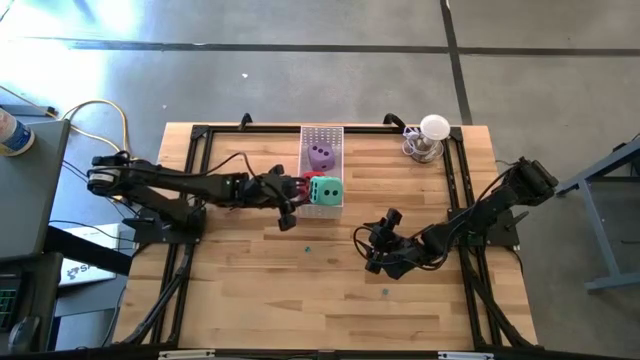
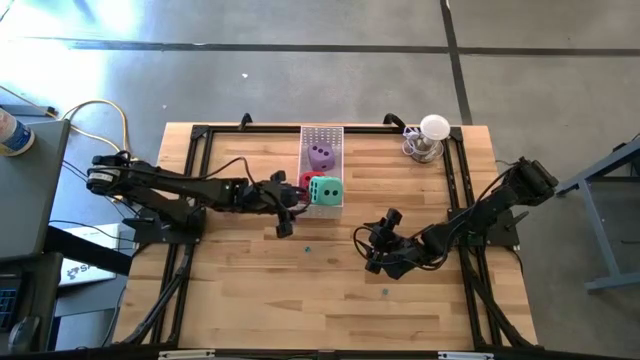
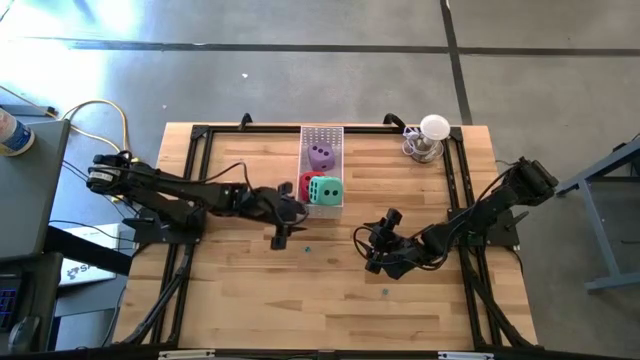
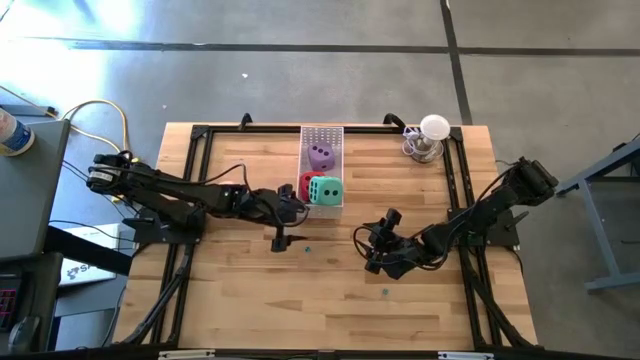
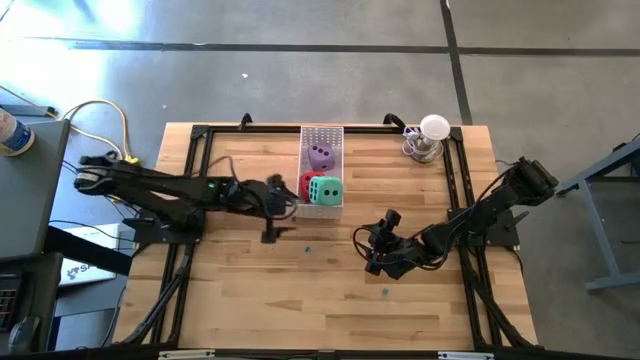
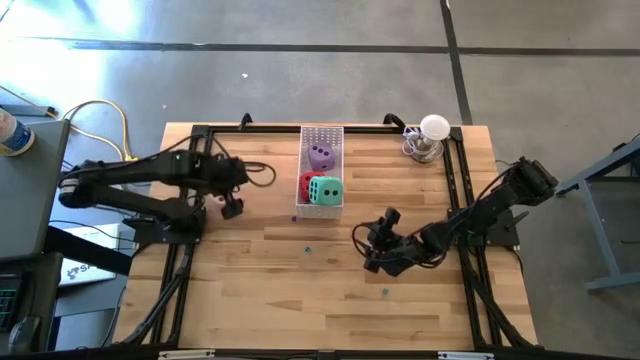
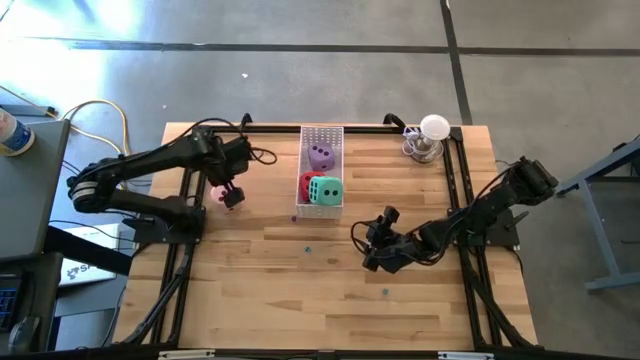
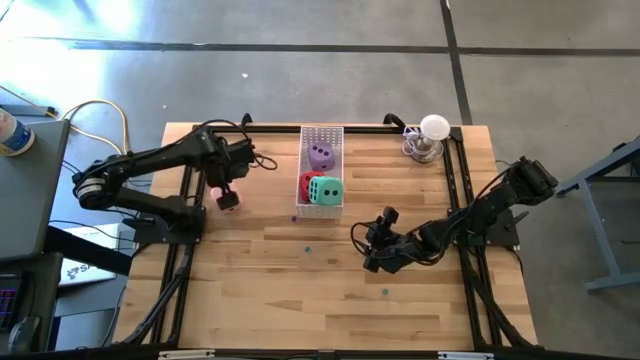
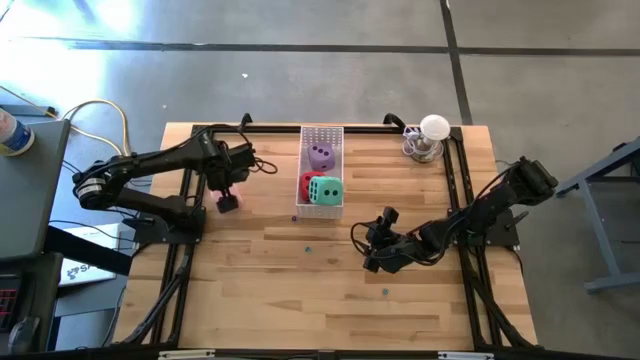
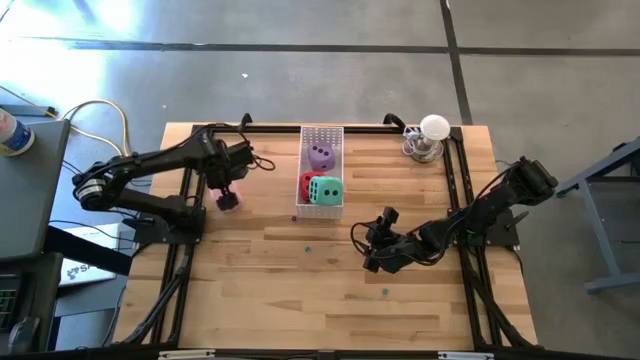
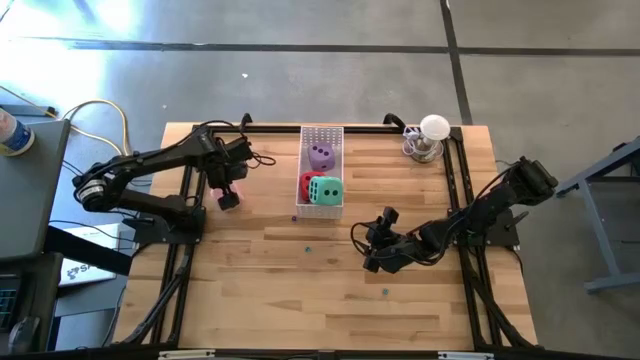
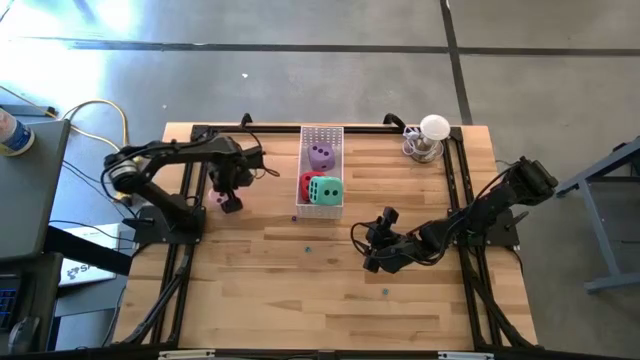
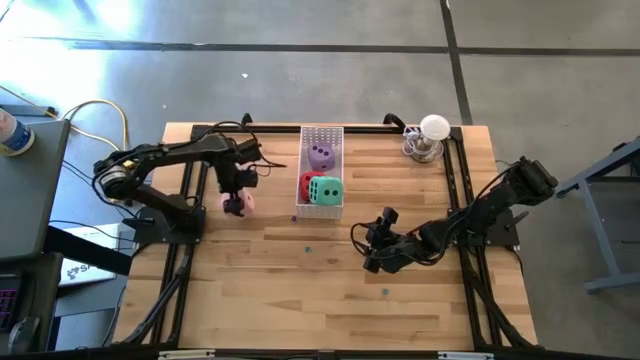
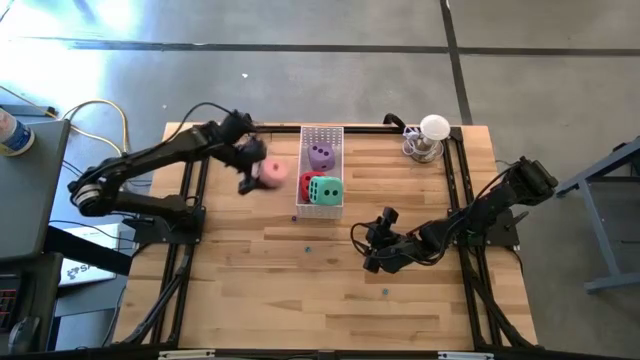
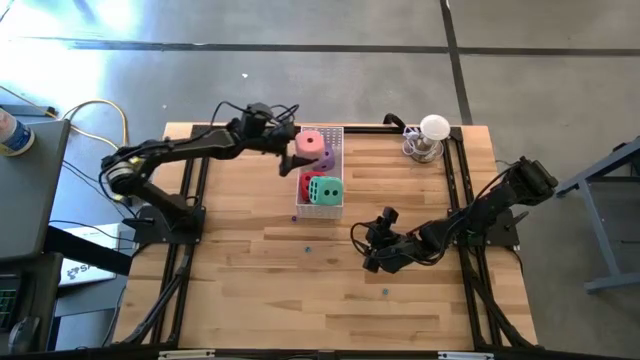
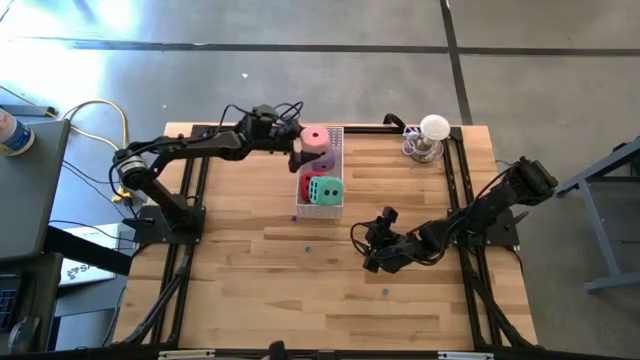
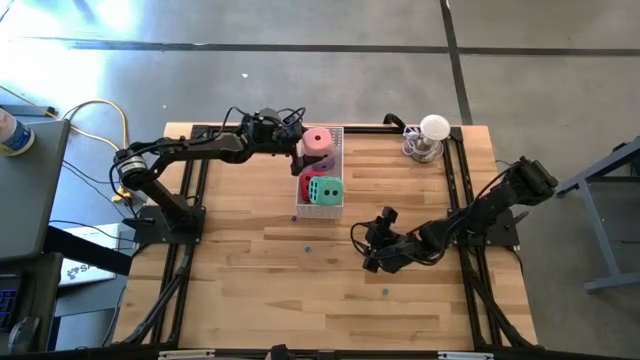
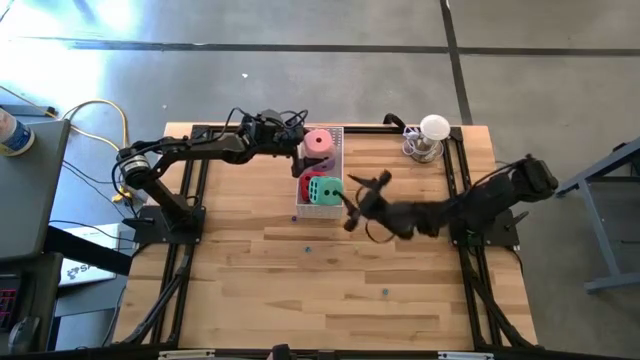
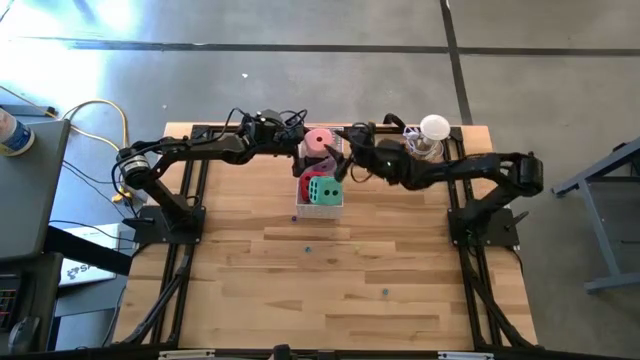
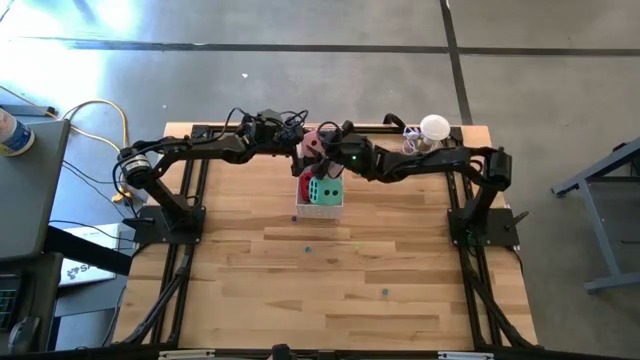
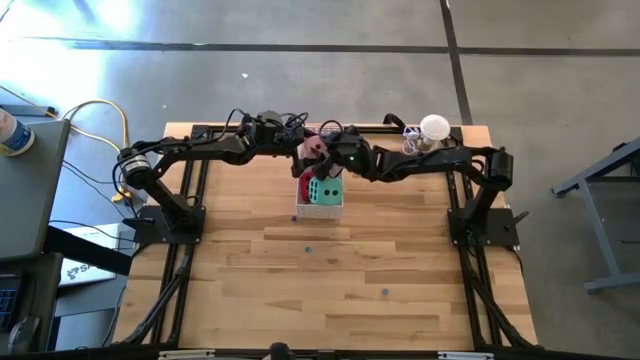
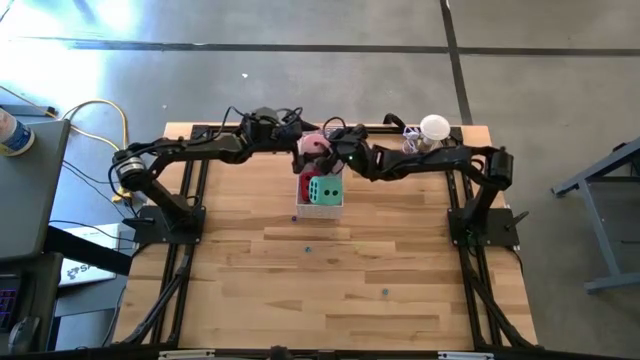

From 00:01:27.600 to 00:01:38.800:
Task: Pick & Place Dice
Put the large pink die into the bin

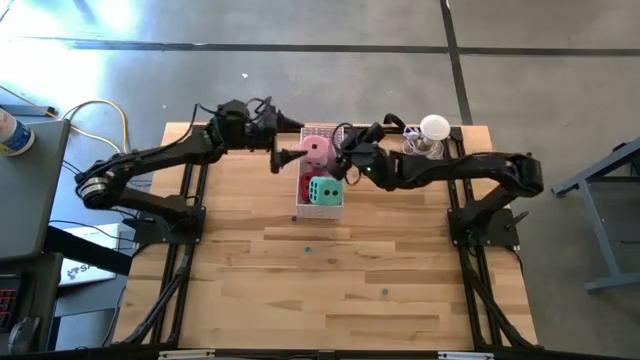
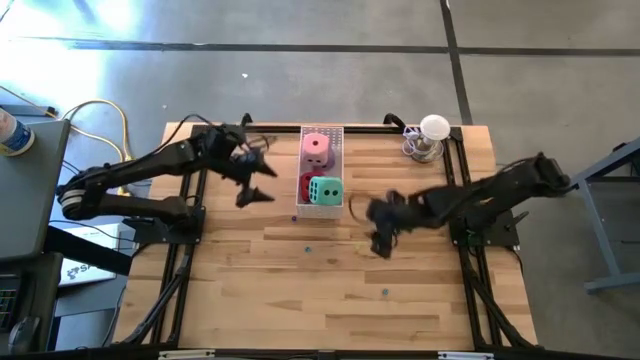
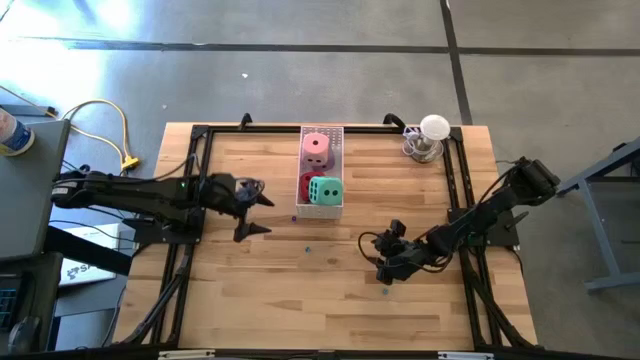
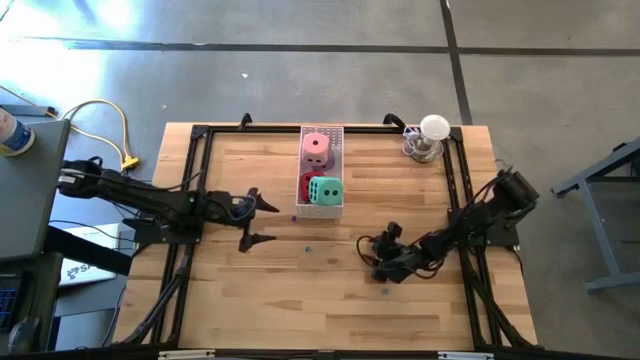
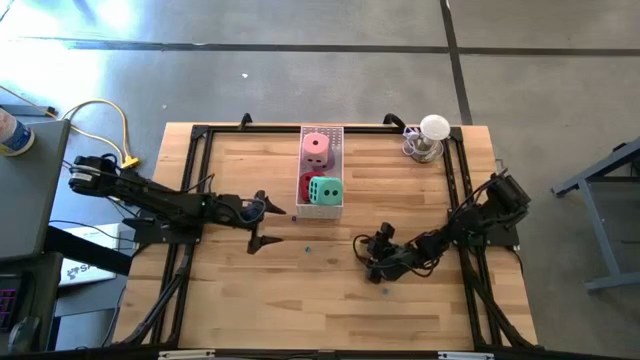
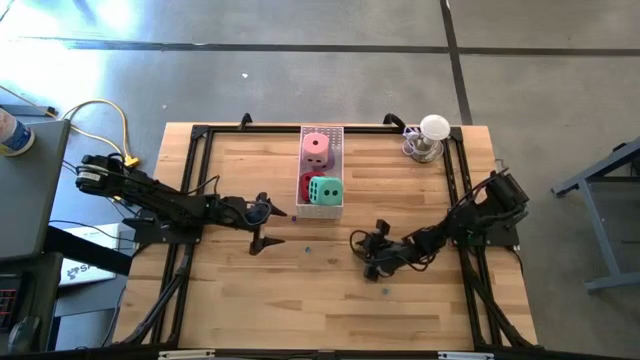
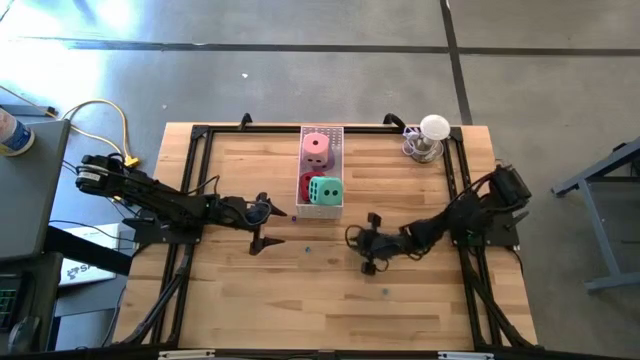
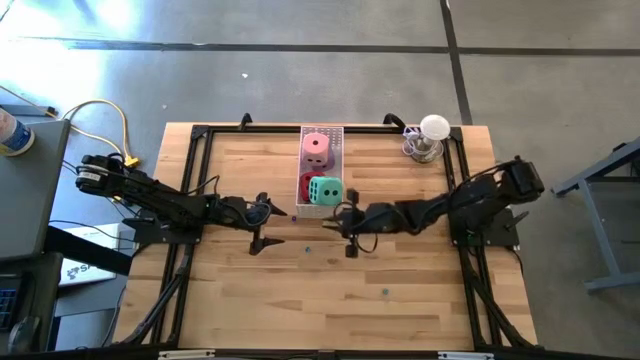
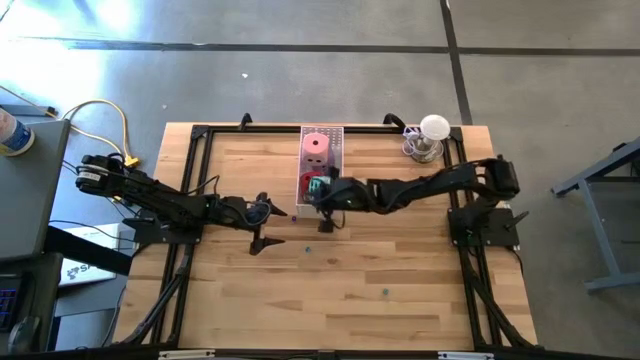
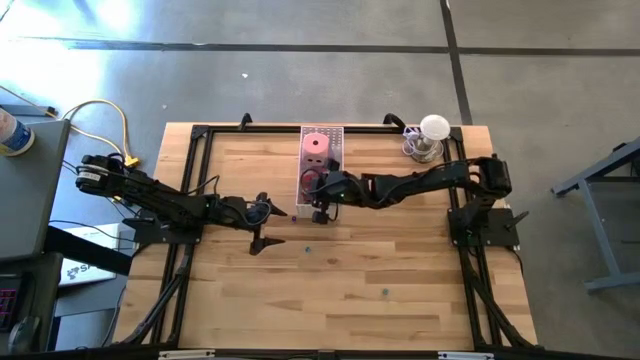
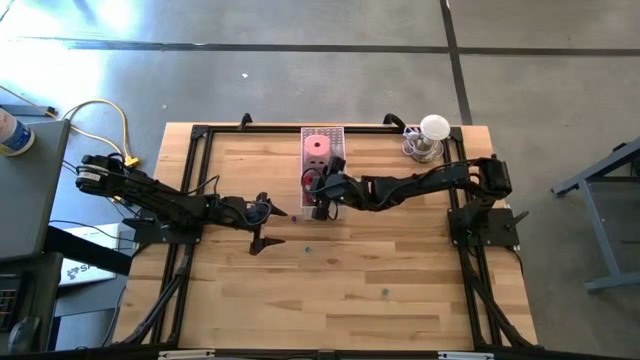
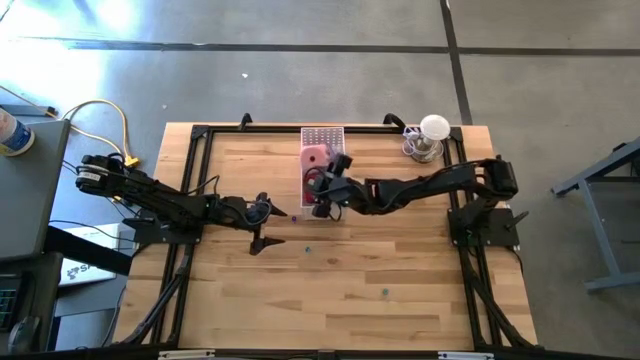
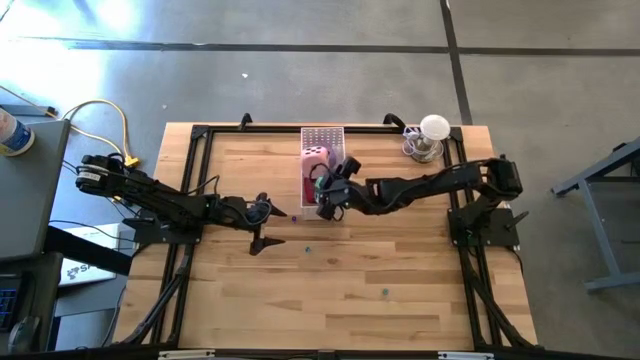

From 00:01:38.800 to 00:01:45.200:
Put the small green die into the bin

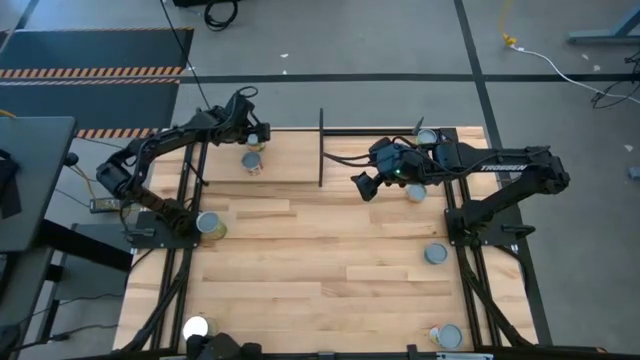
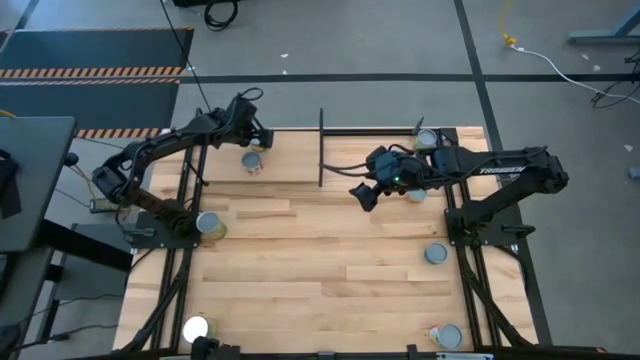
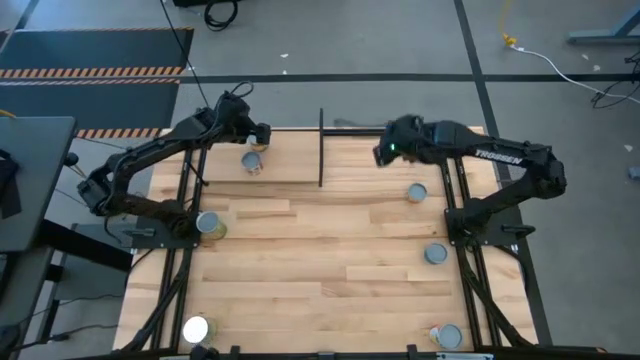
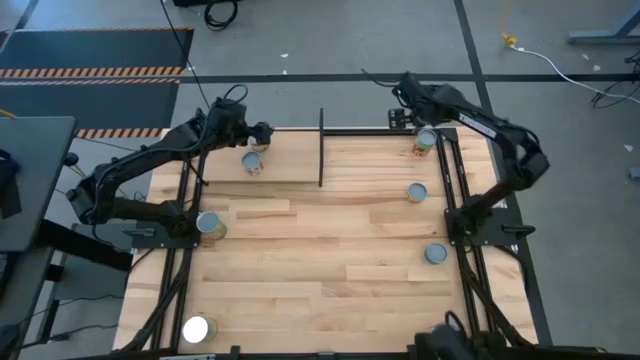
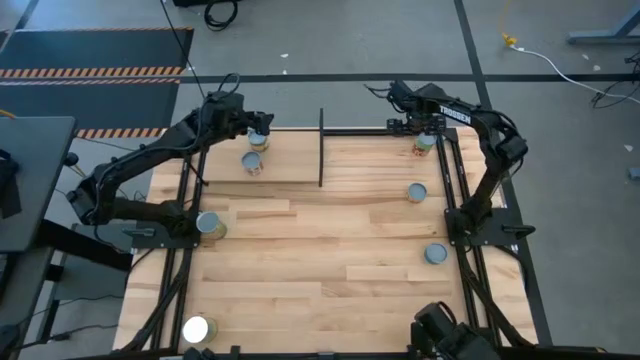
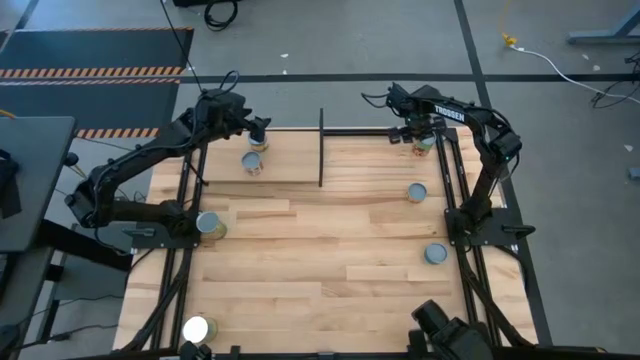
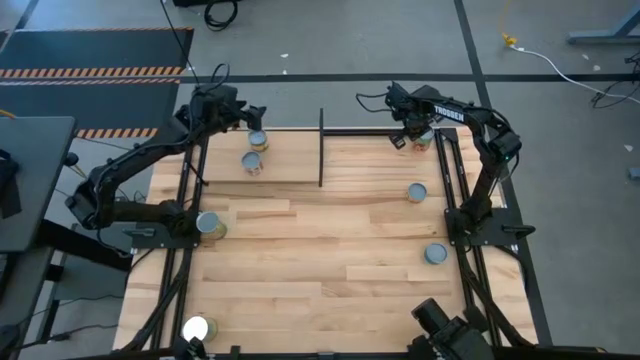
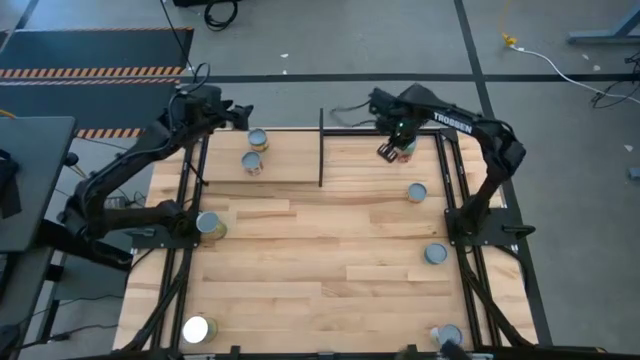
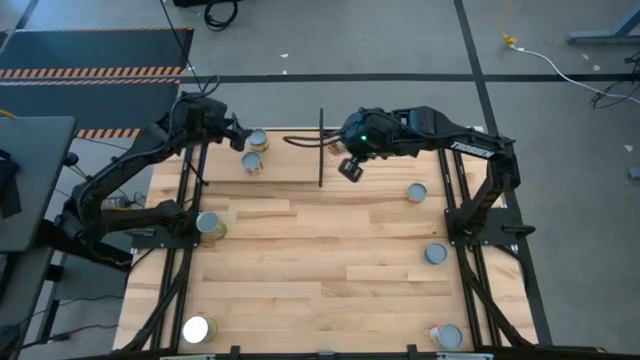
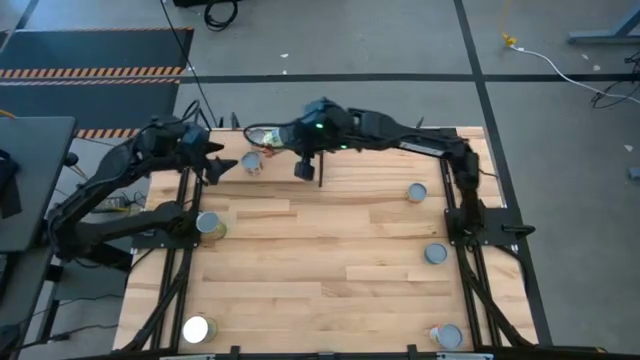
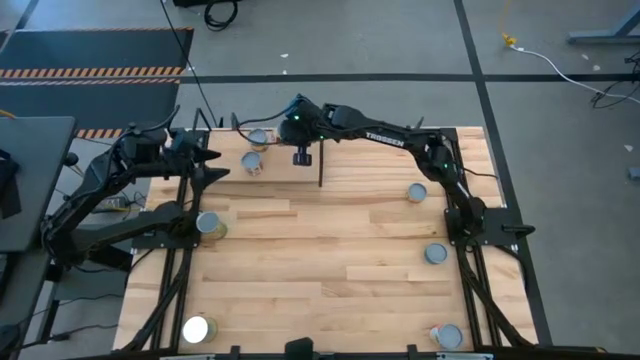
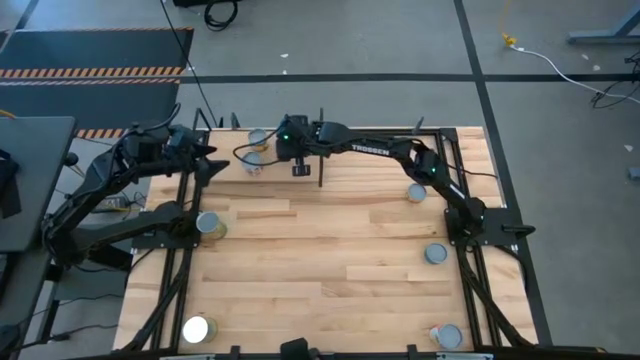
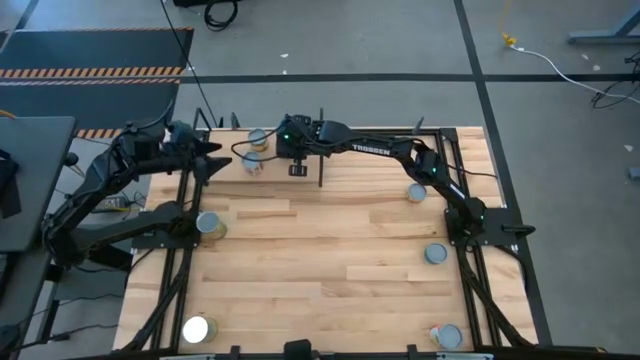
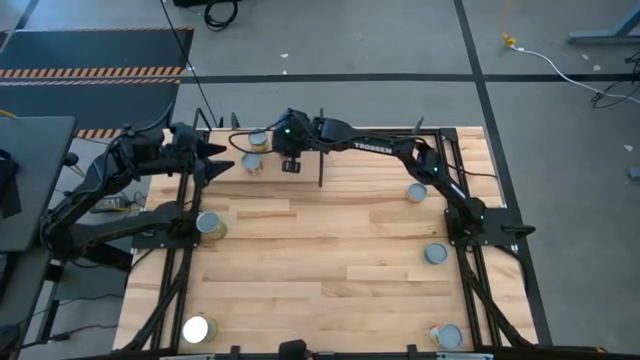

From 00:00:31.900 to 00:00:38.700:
Task: Pick and place cans onto a shelf
Put the canned spaghetti sauce on the shelf
